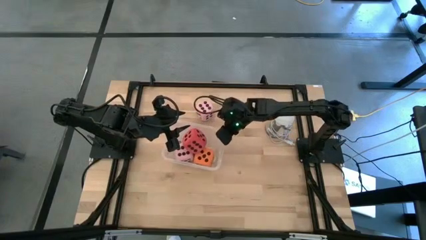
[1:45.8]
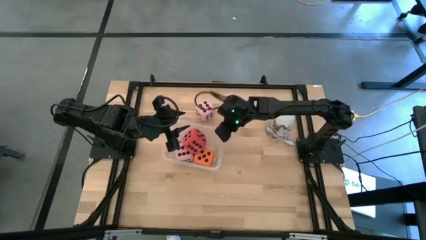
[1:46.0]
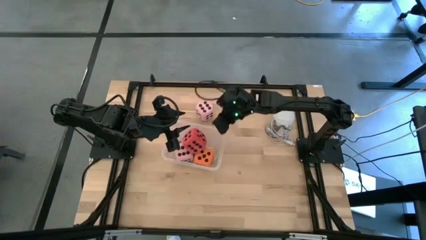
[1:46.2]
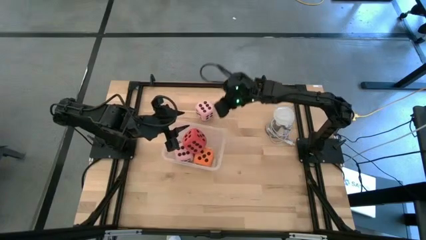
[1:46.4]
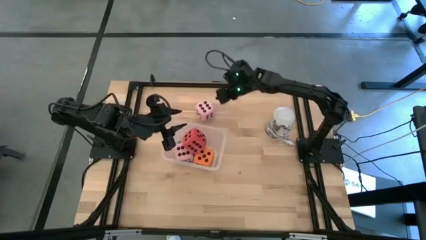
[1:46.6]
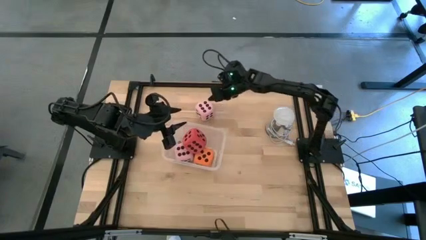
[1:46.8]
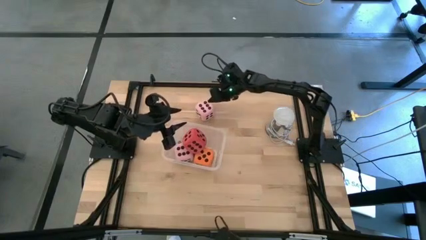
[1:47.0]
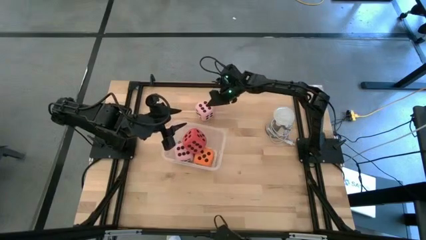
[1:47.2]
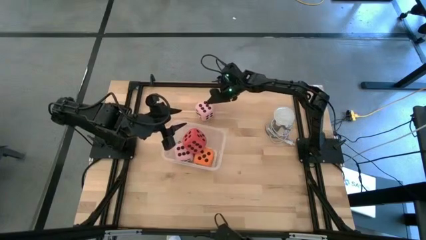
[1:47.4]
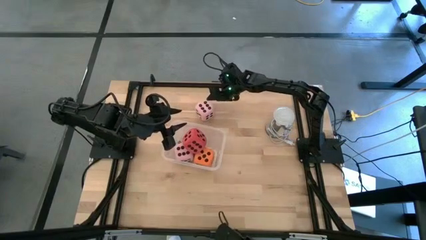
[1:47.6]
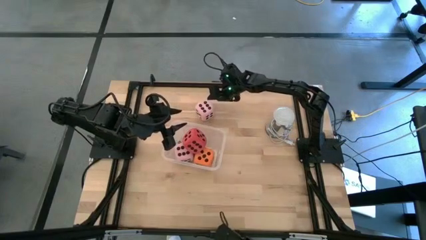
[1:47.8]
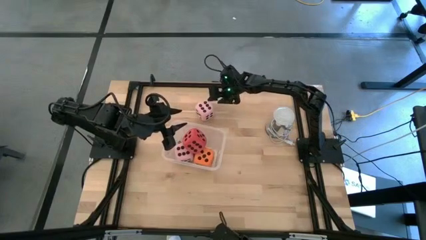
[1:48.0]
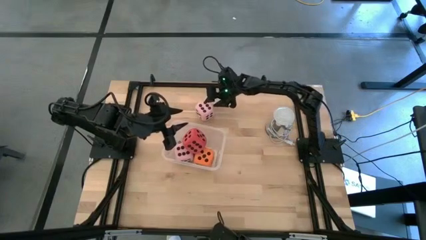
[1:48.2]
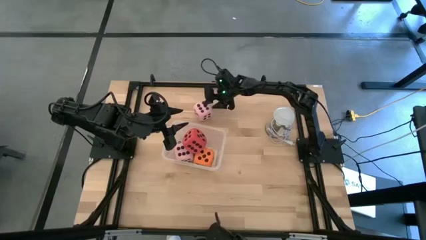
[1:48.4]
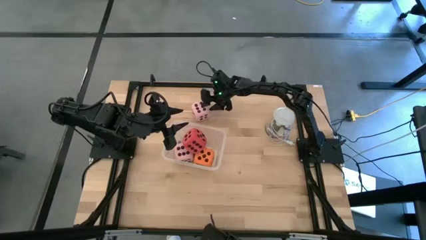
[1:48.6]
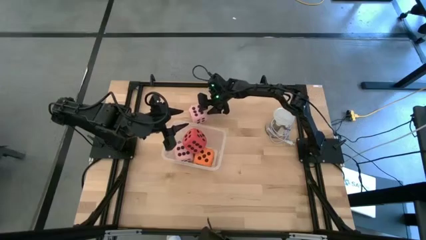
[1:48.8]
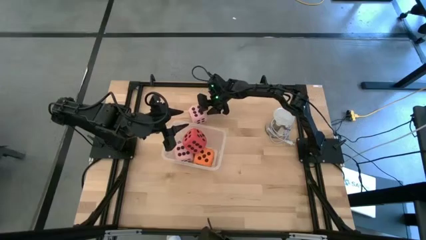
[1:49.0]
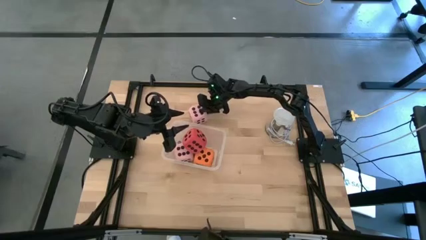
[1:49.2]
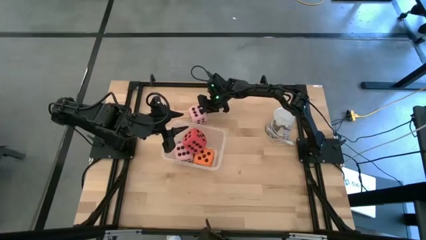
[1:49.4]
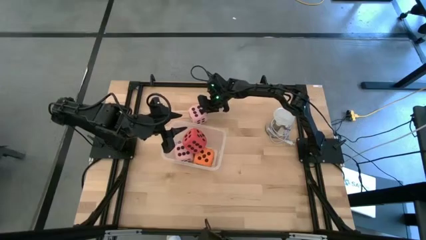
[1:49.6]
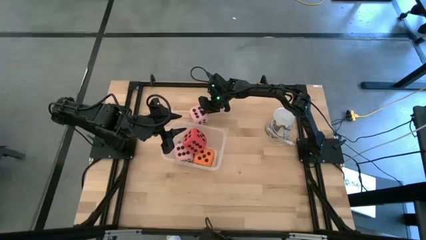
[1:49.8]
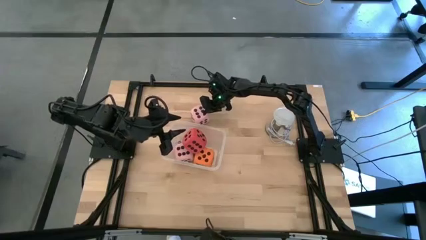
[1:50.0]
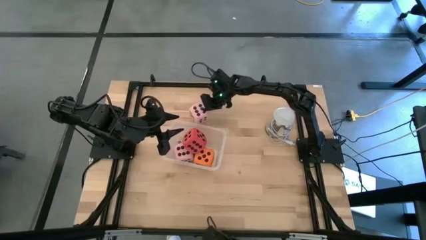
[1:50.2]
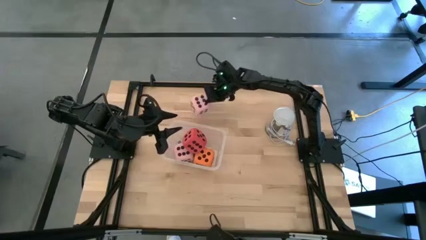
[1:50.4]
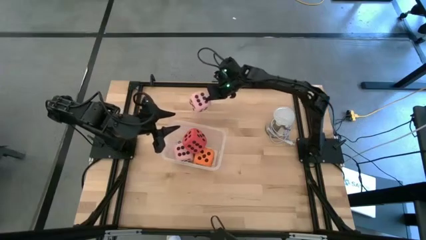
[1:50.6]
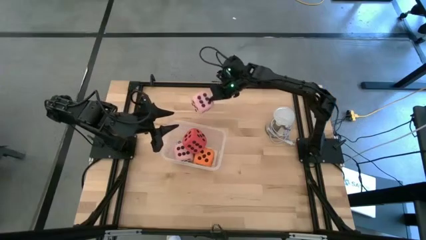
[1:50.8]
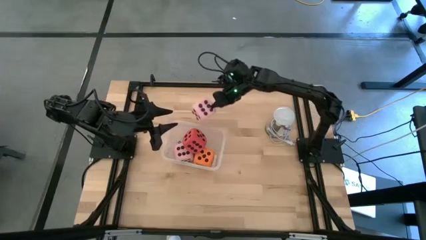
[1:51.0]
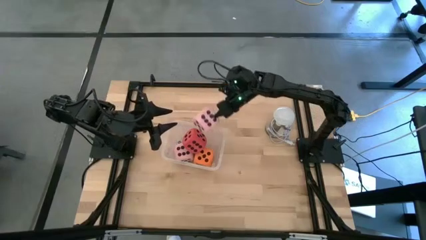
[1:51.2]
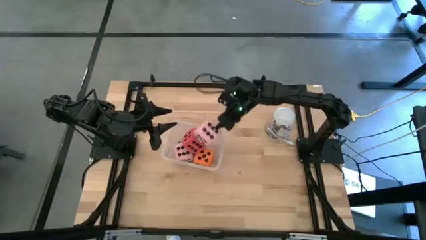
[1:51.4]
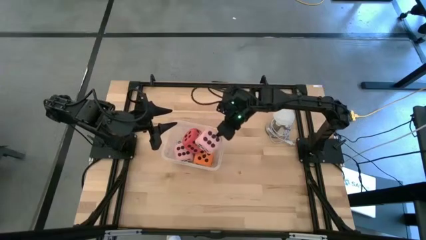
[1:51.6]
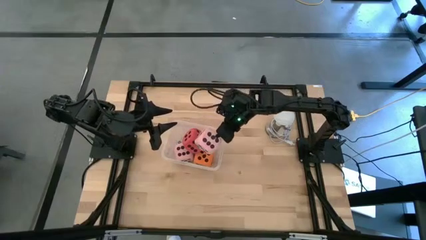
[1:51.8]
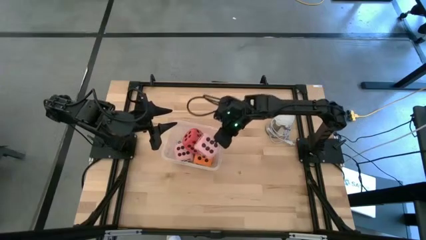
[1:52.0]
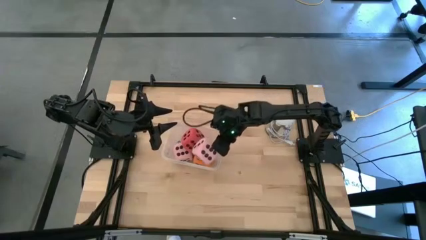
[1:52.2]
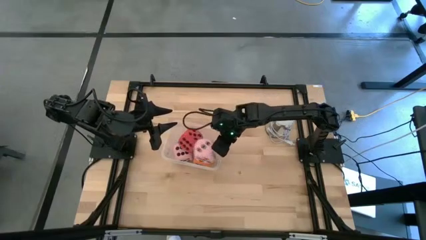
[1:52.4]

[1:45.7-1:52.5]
Task: Pick & Place Dice
Put the large pink dice into the transparent bin

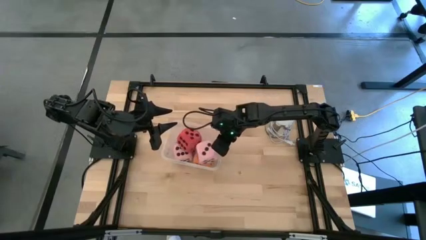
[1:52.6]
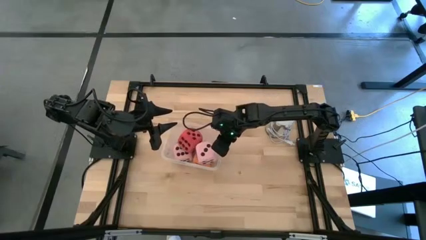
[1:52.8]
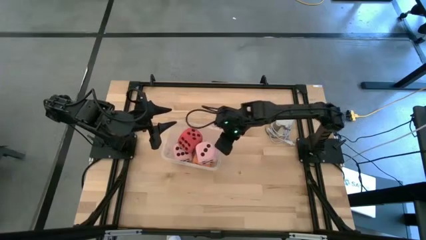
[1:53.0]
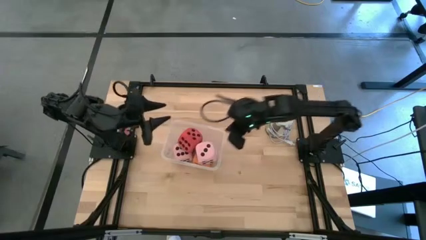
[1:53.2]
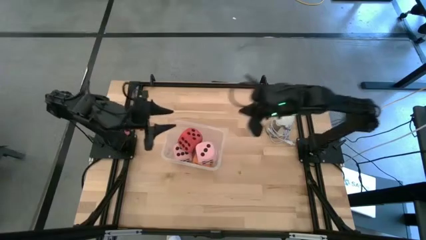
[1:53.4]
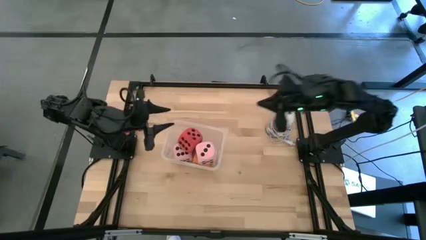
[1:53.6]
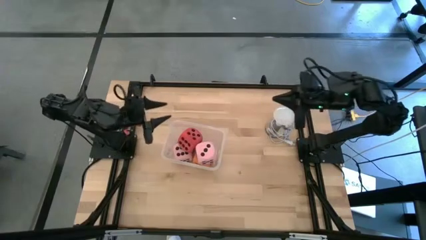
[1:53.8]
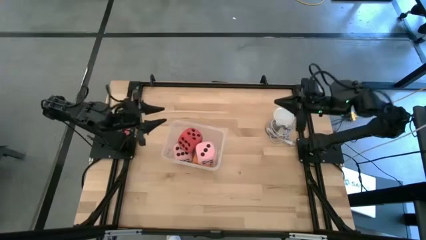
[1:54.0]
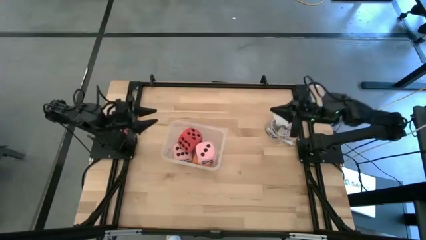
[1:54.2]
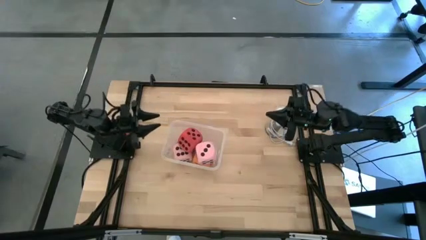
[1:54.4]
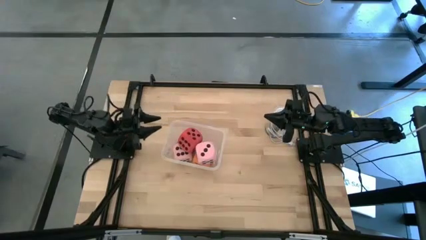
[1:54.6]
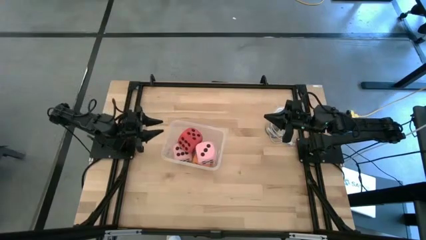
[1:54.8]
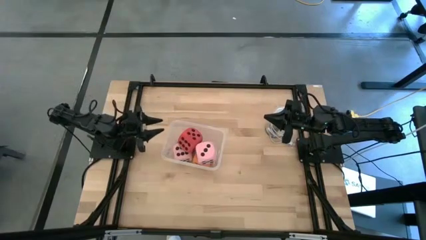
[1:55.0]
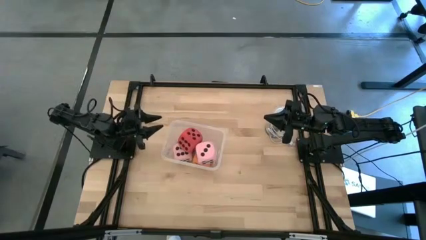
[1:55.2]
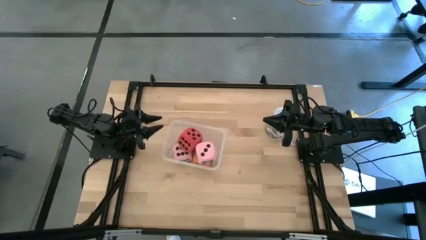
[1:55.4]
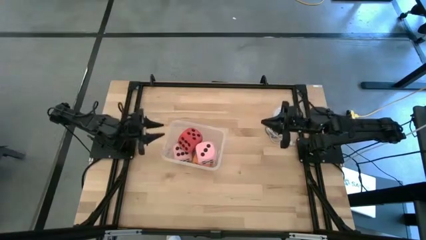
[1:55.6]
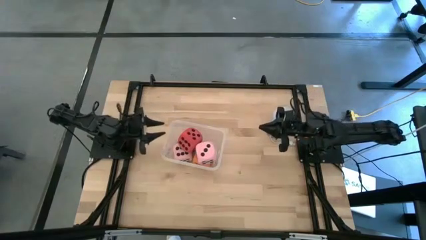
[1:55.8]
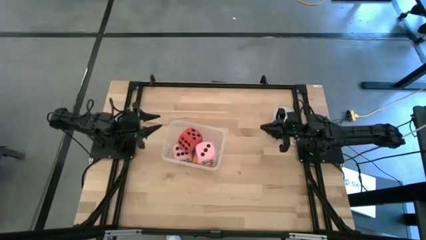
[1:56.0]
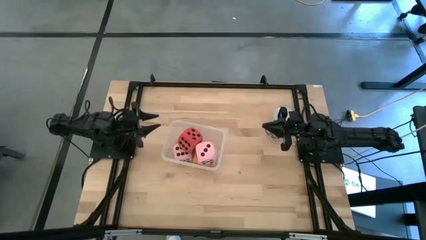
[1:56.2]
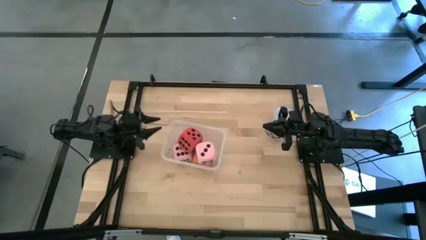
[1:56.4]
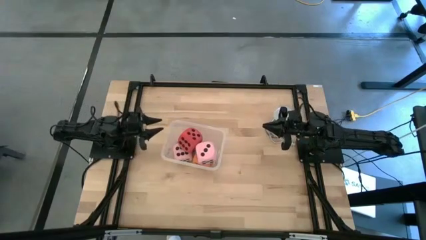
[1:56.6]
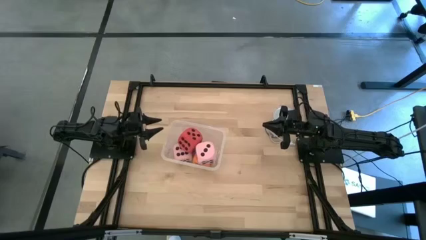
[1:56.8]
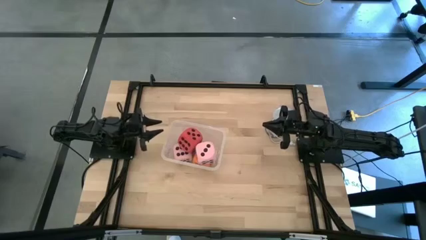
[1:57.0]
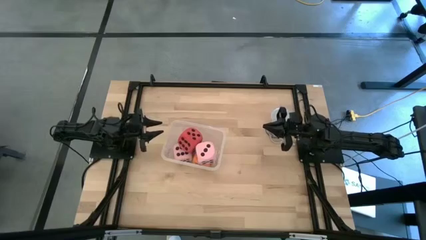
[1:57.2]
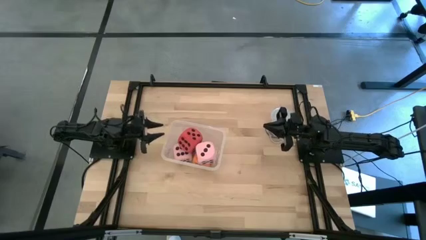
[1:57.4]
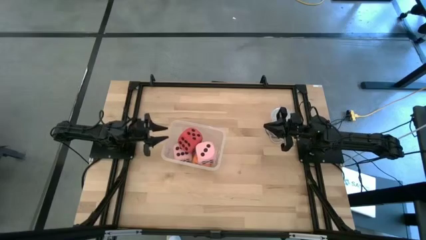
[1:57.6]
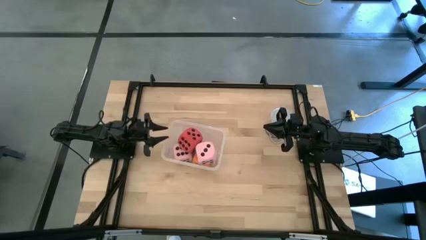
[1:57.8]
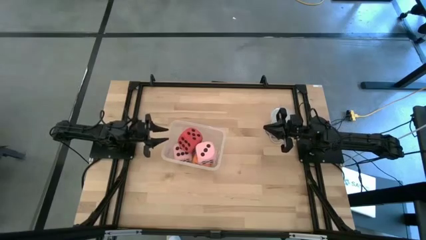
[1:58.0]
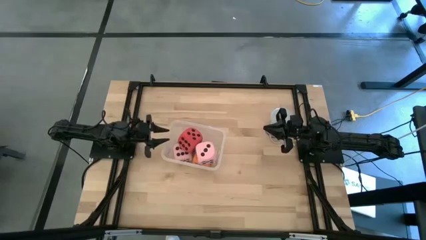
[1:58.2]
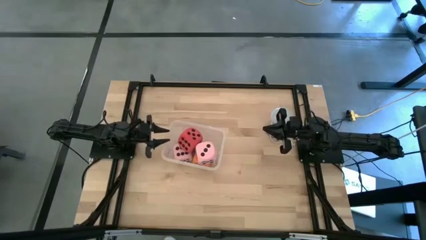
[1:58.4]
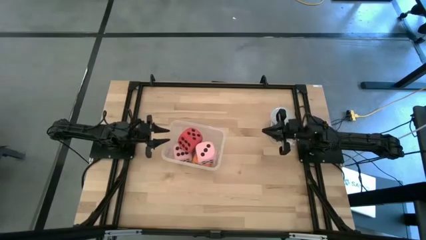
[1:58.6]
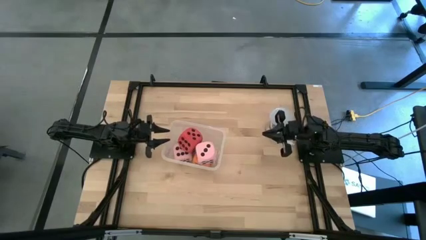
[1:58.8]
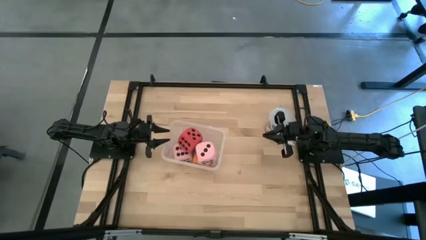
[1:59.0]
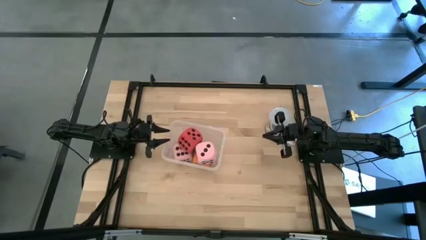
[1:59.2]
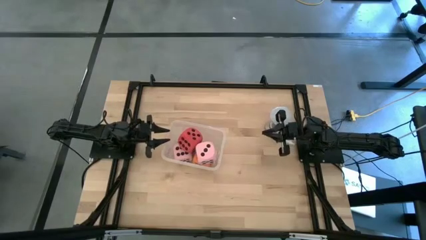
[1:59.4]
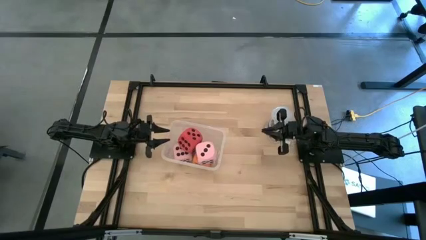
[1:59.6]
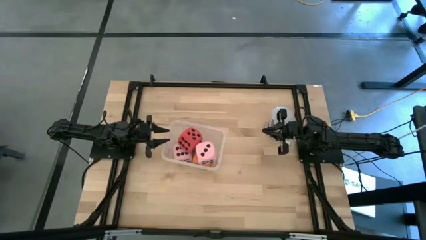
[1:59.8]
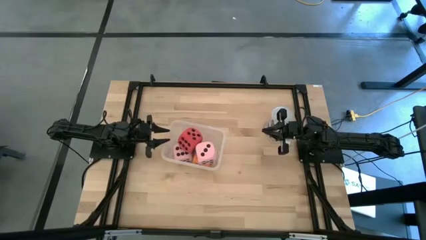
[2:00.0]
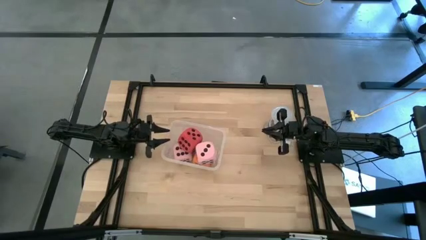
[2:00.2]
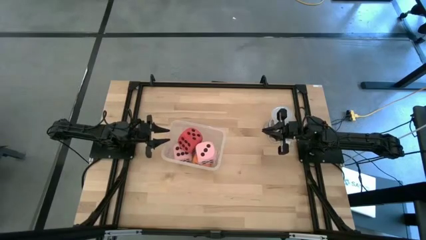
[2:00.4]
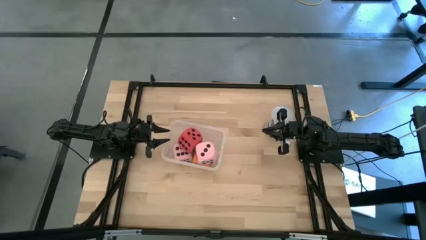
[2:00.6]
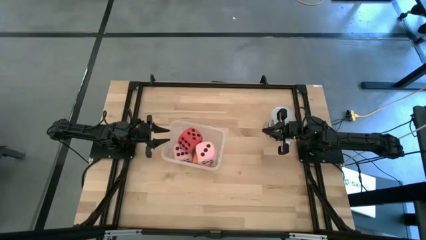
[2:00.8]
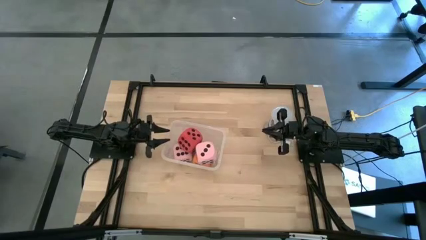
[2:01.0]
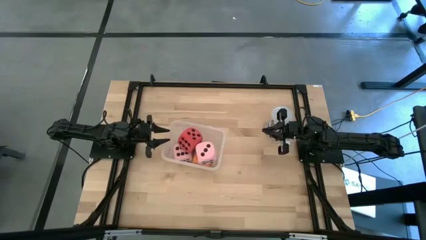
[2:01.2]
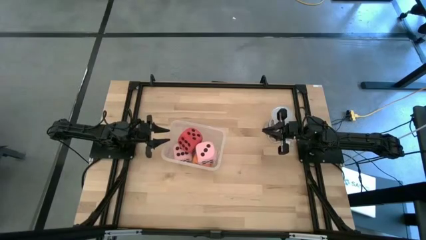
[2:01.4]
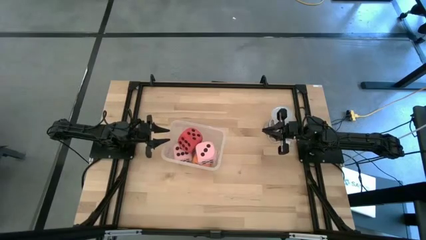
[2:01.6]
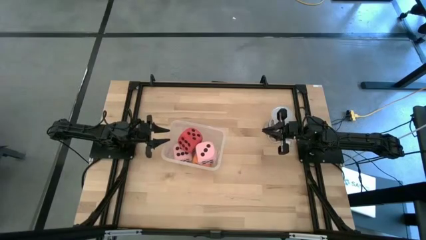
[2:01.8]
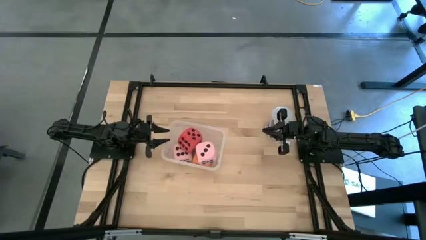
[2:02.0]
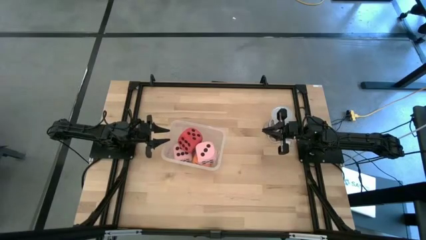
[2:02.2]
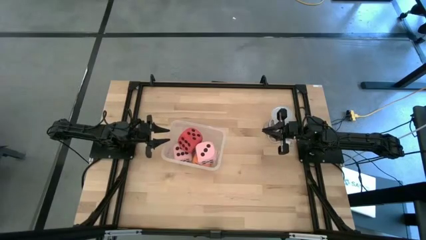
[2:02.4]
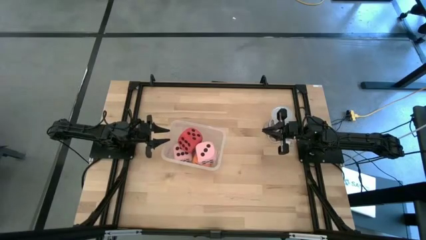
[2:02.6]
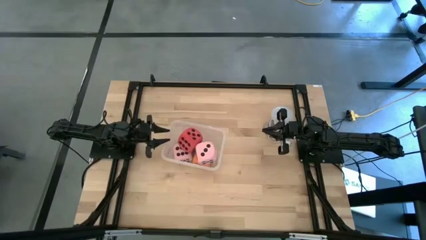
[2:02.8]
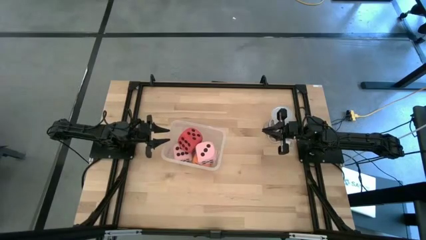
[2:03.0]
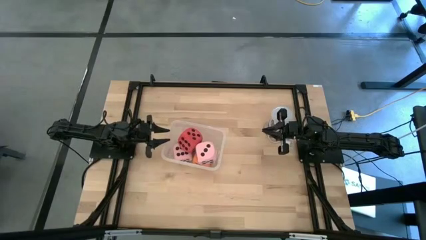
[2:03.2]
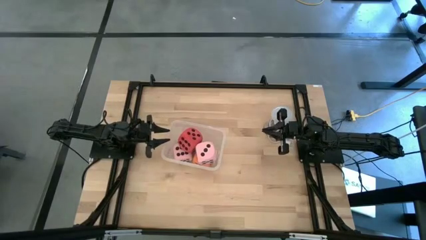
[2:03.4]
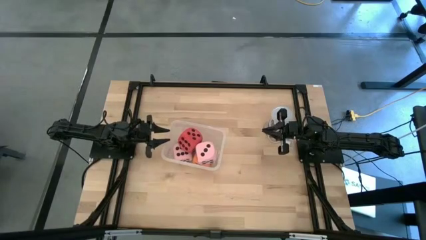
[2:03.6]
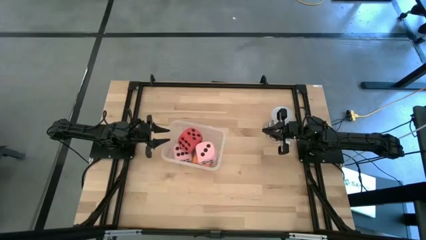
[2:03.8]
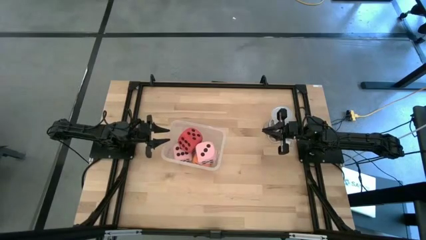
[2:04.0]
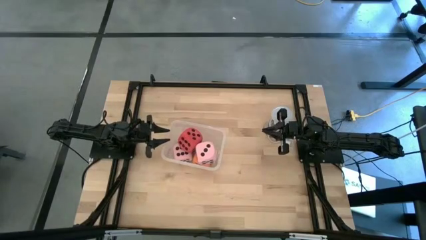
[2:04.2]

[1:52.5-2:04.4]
Return to Home Position
